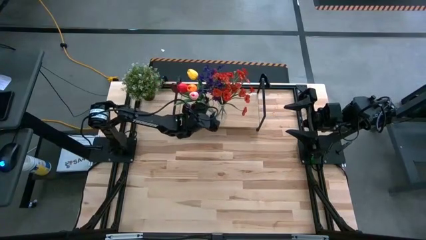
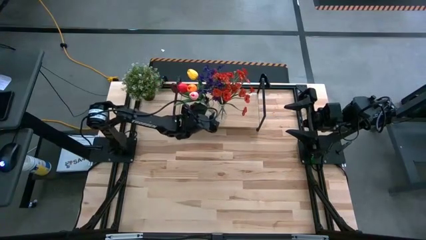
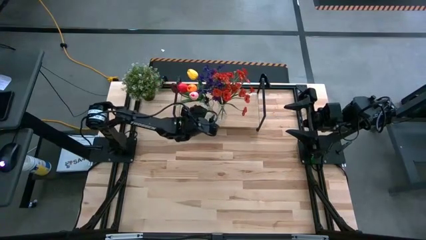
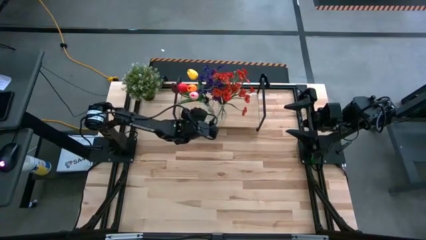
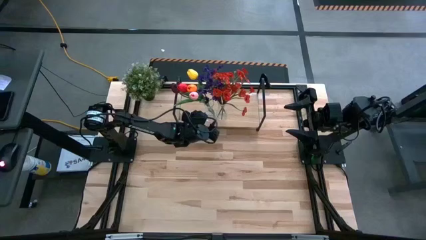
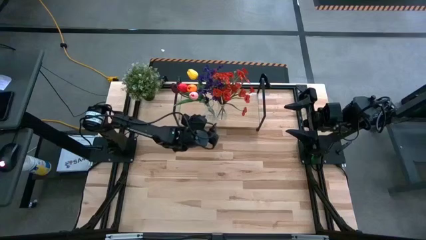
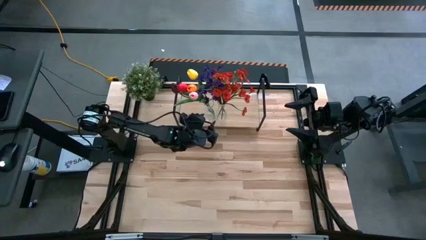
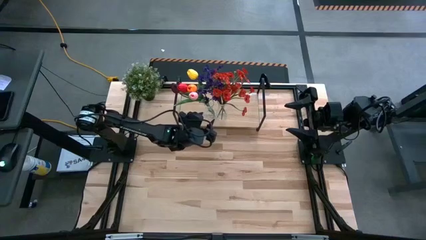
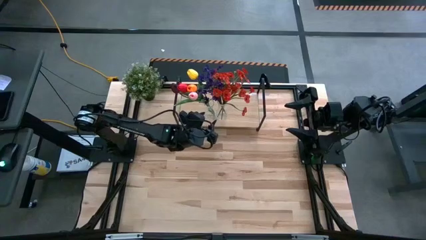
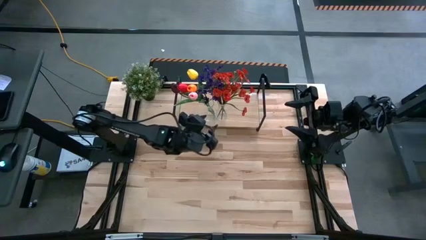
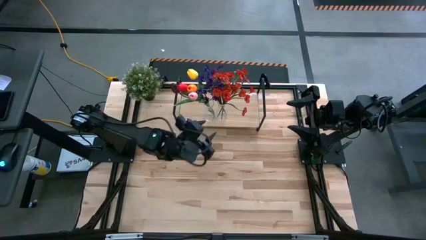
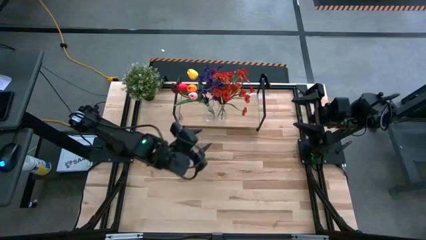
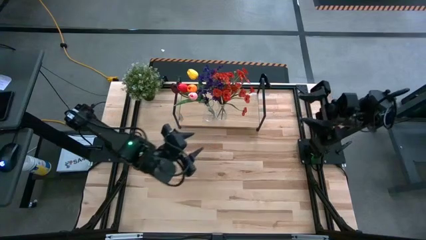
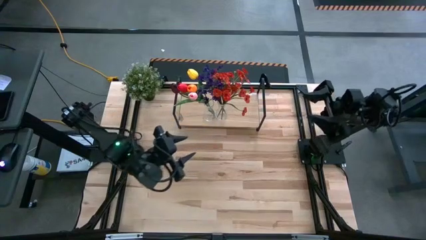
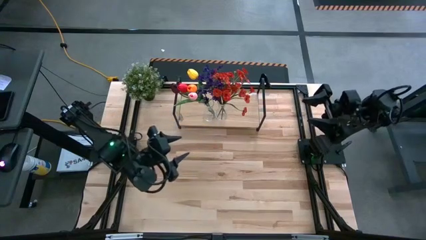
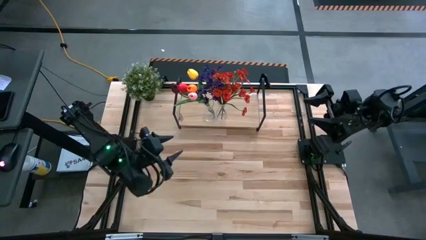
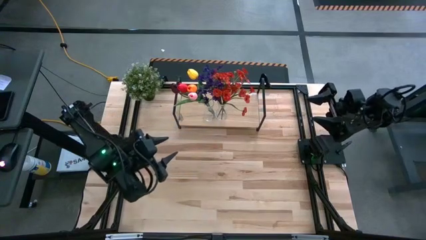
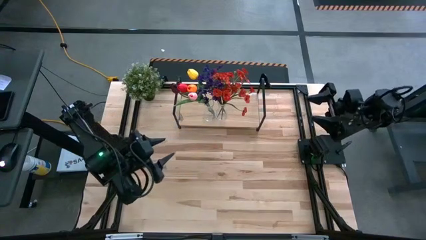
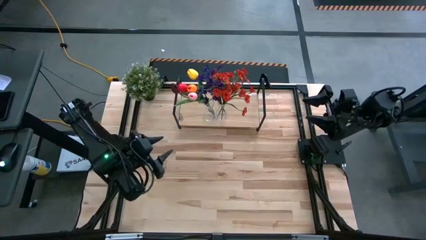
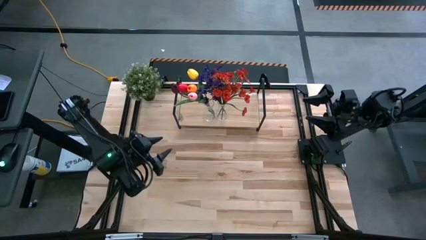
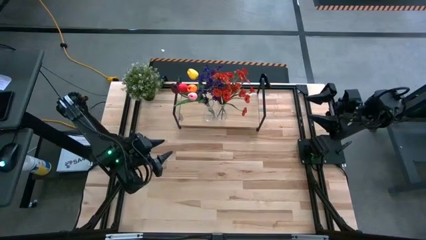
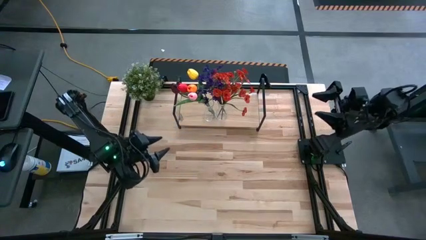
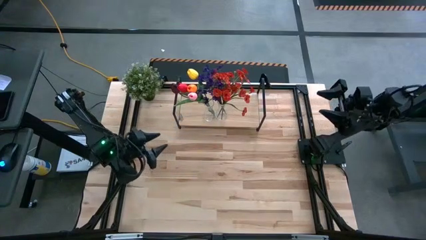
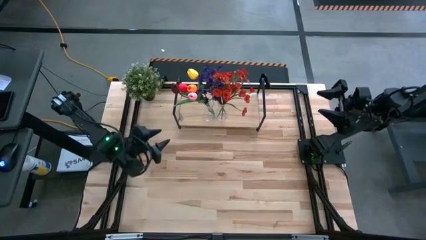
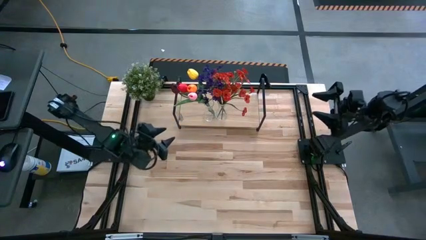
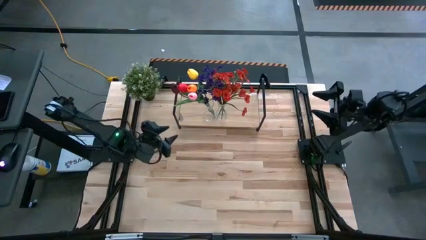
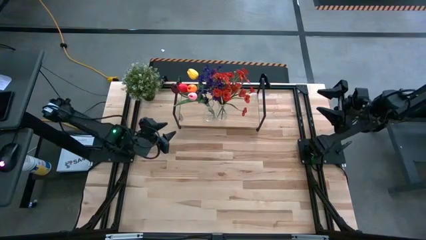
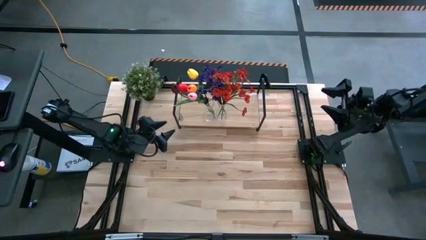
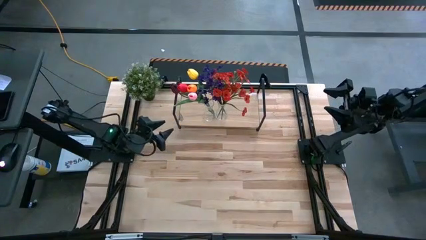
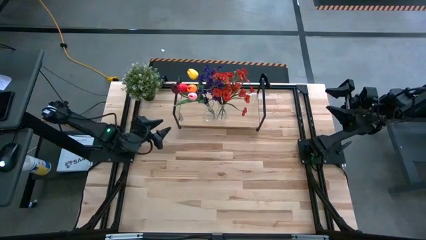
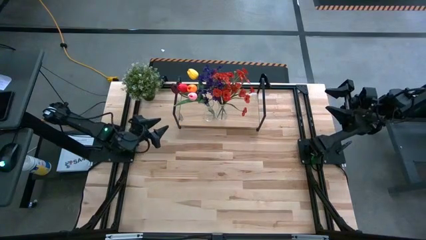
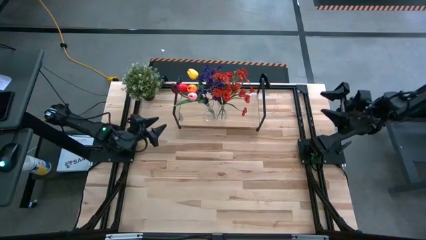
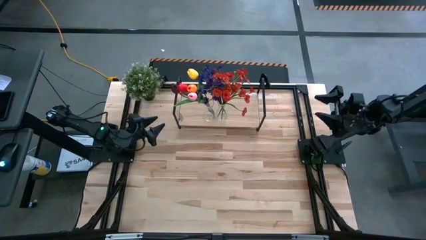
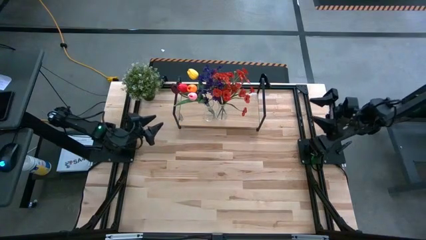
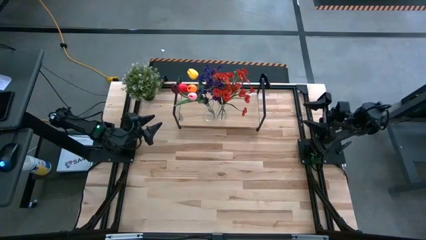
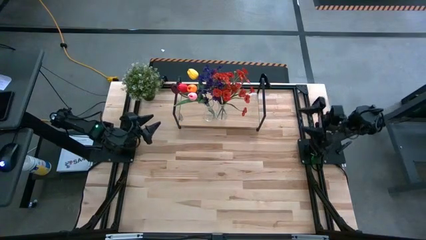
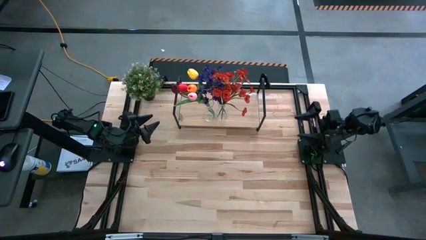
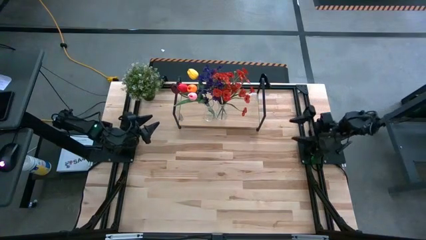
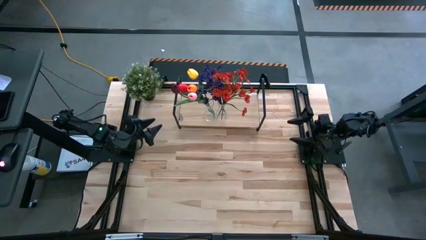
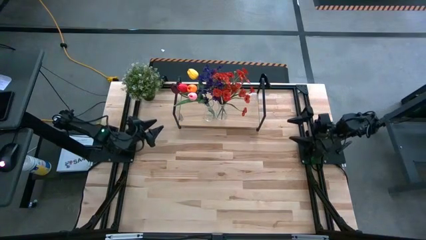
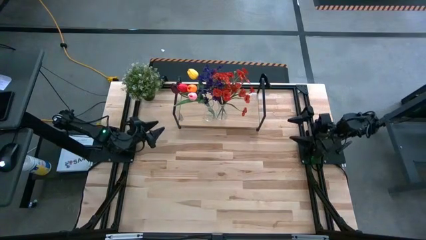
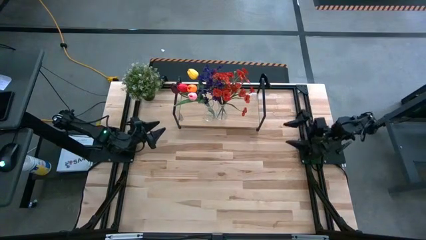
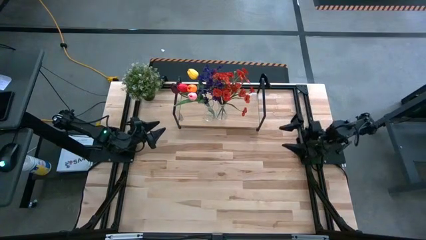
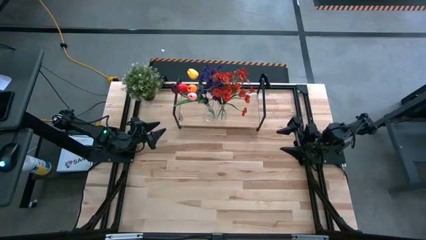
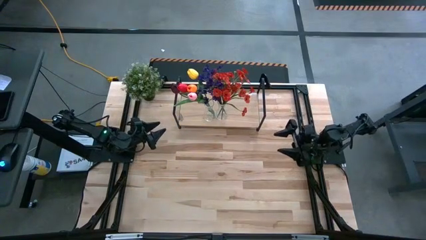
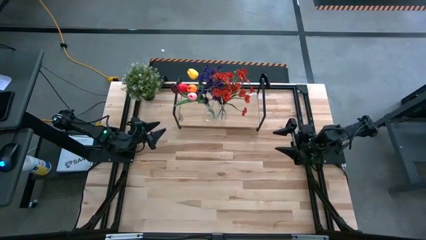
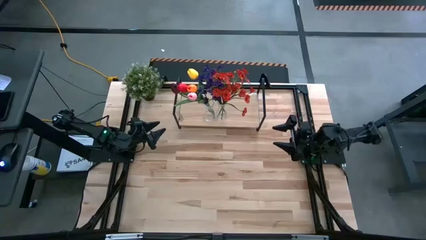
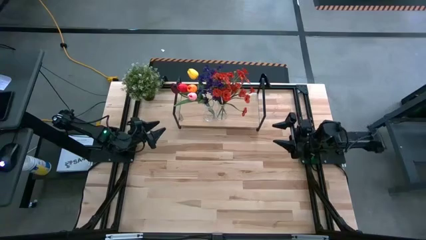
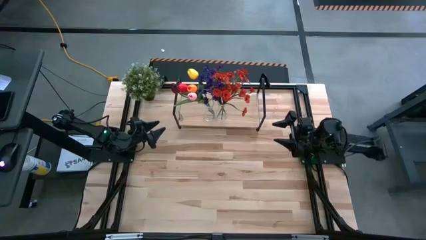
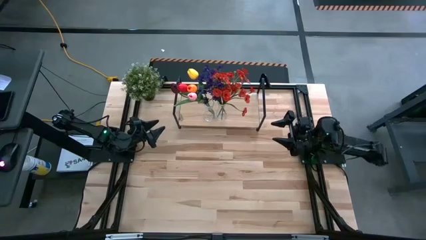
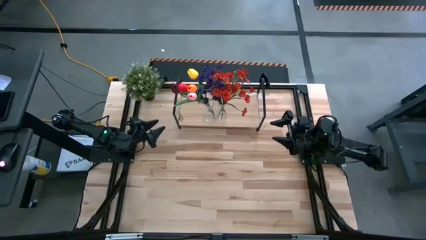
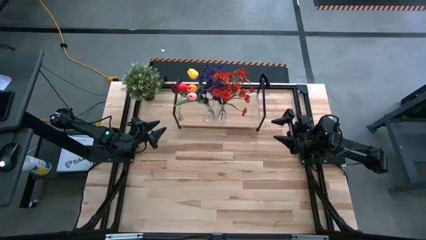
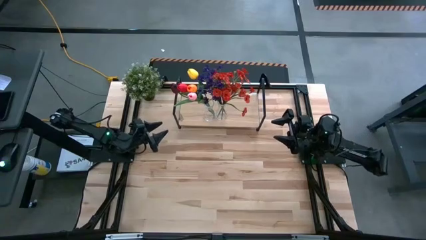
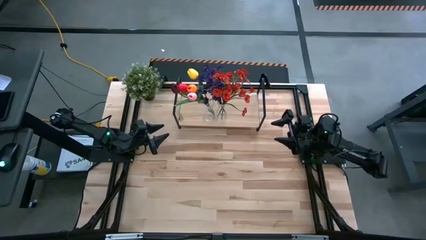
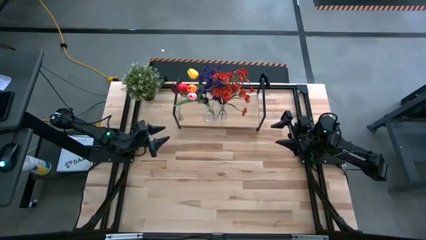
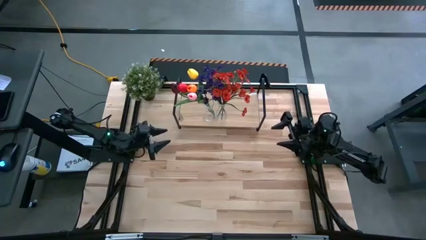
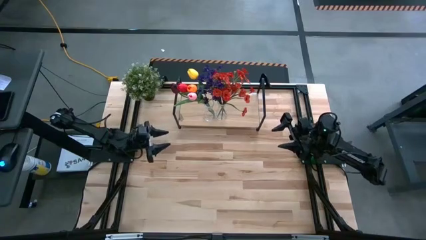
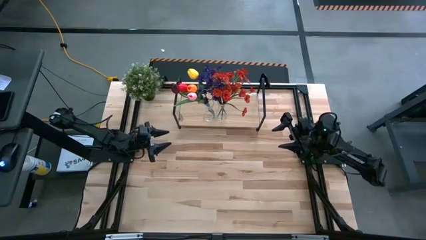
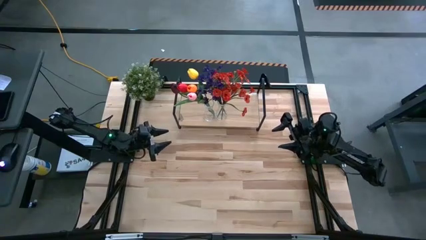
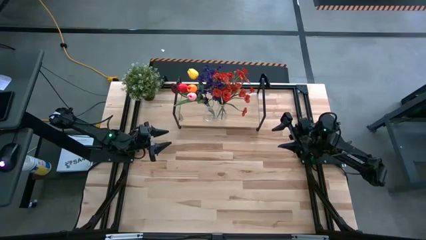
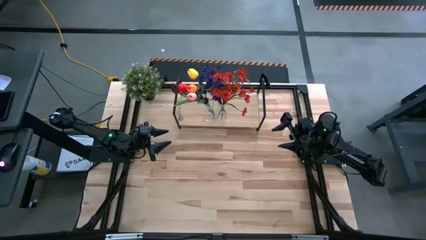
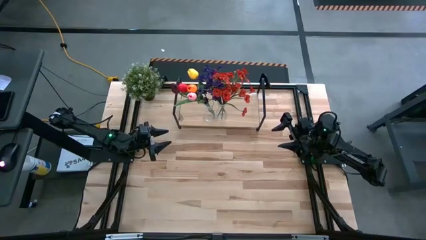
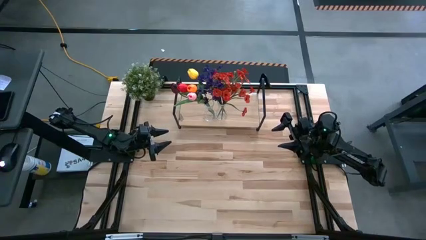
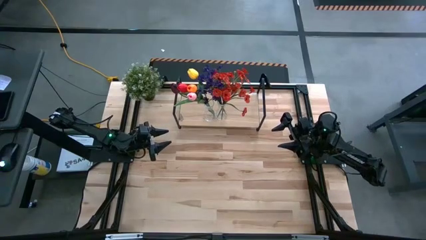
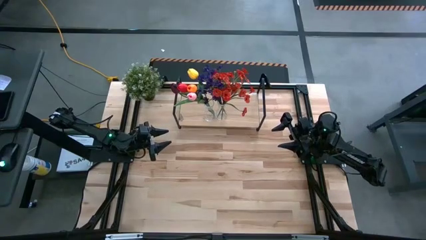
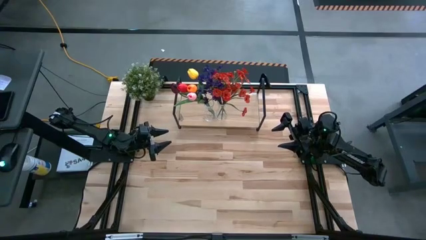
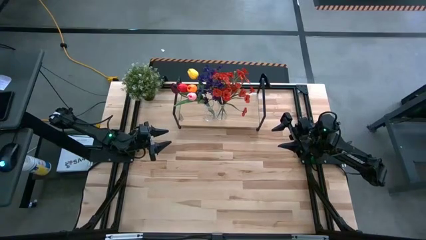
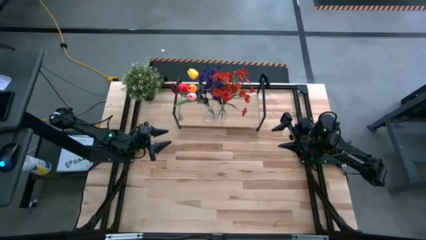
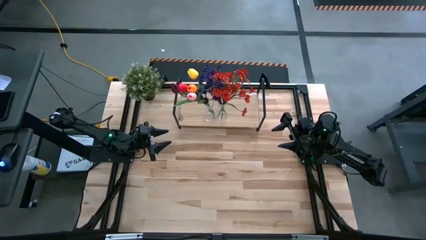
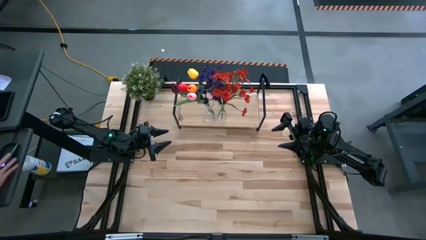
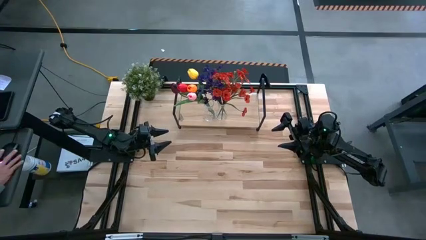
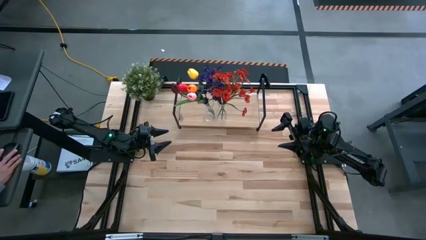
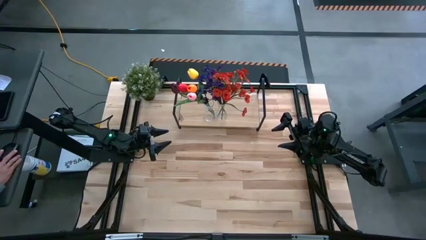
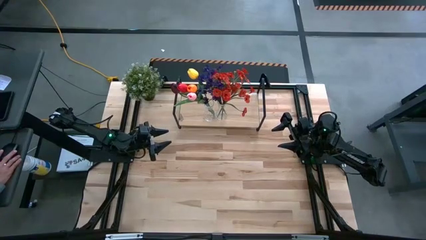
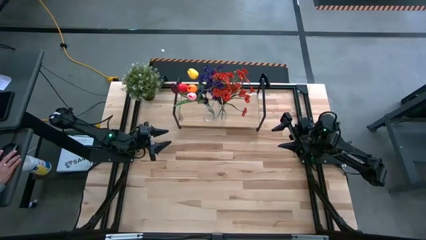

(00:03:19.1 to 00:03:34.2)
Task: Pick and place flowers into a vace then onto a shelf
Return to Home Position
